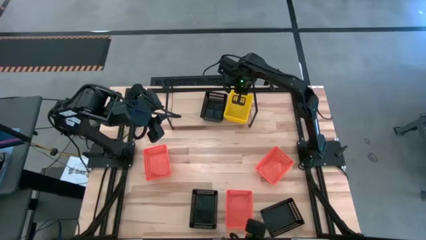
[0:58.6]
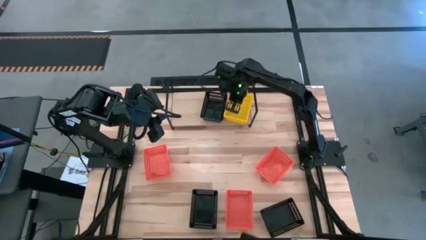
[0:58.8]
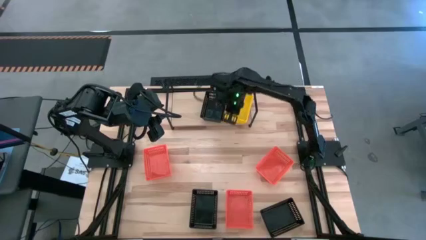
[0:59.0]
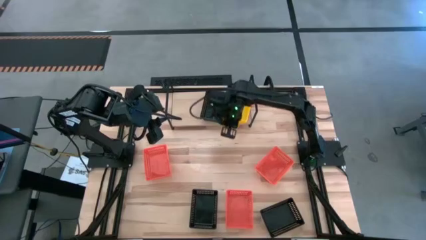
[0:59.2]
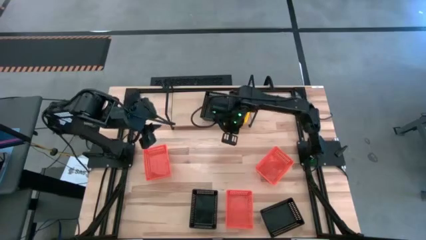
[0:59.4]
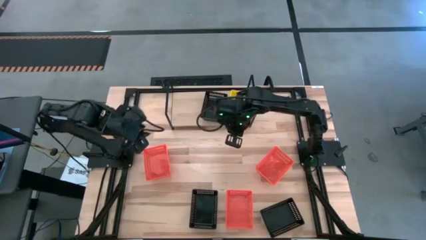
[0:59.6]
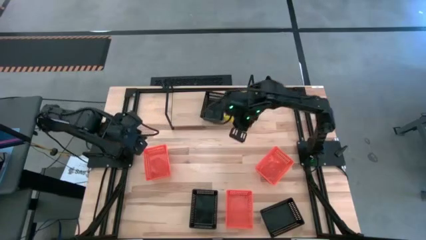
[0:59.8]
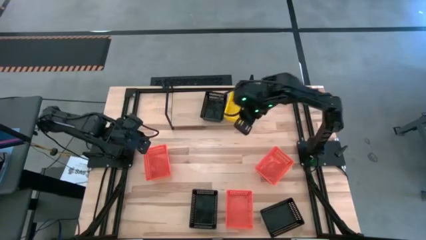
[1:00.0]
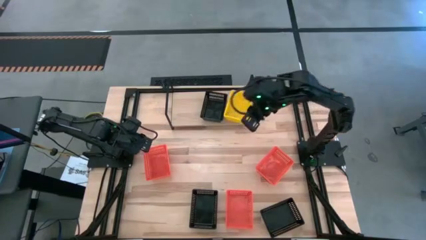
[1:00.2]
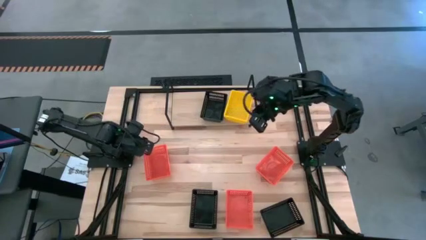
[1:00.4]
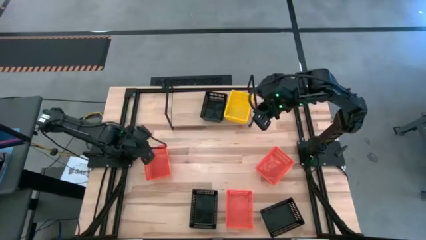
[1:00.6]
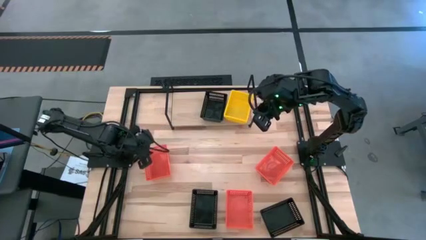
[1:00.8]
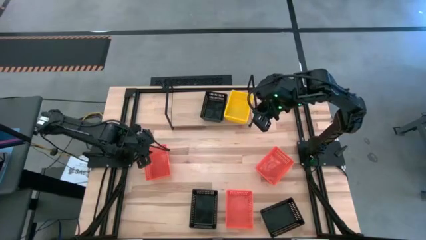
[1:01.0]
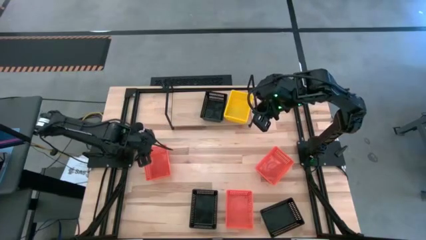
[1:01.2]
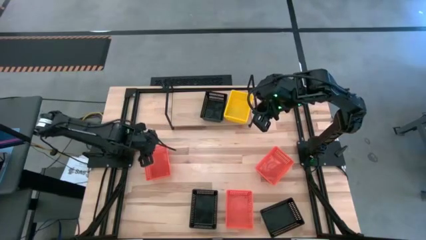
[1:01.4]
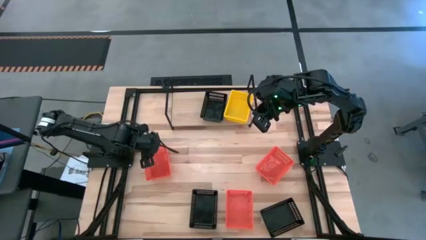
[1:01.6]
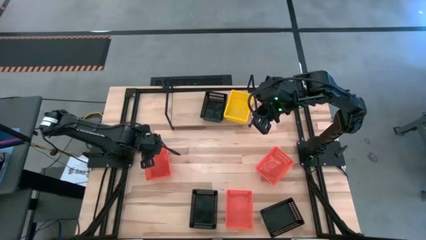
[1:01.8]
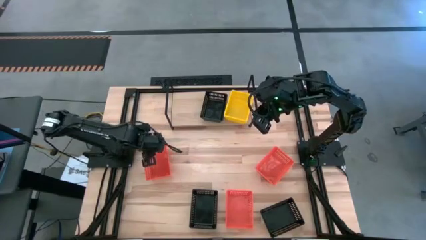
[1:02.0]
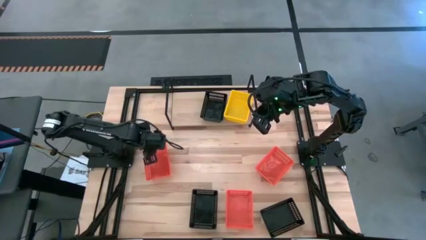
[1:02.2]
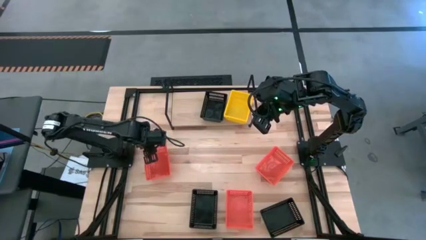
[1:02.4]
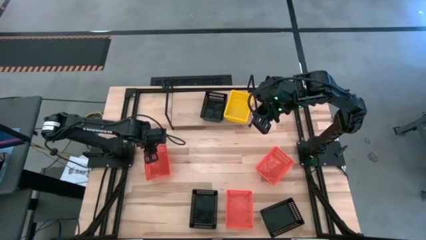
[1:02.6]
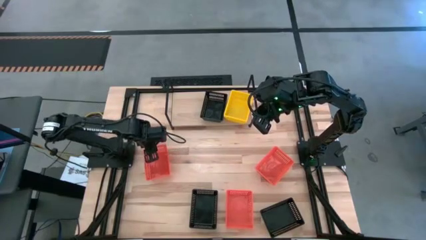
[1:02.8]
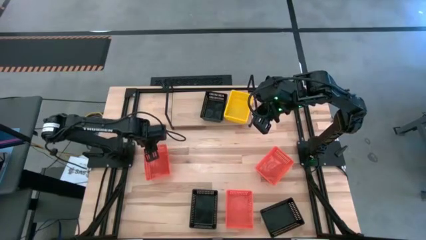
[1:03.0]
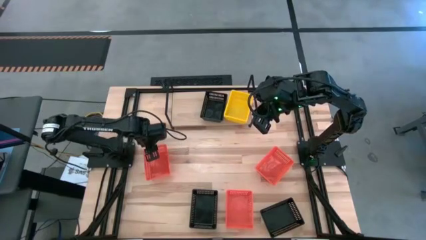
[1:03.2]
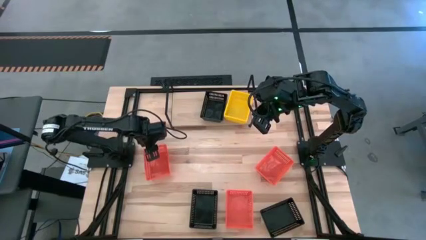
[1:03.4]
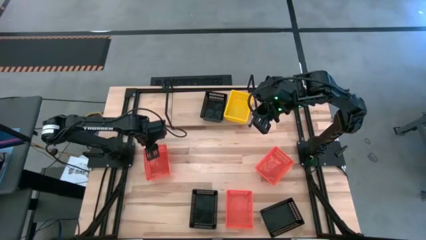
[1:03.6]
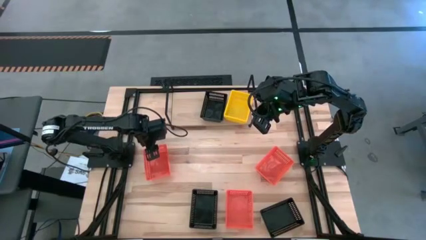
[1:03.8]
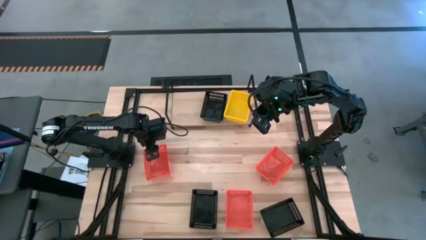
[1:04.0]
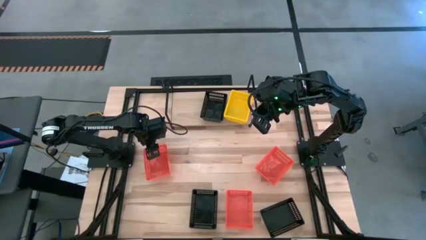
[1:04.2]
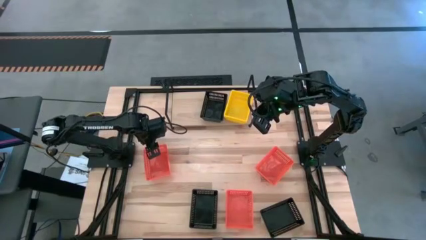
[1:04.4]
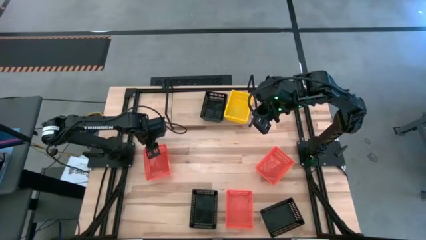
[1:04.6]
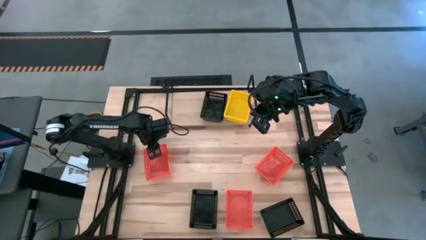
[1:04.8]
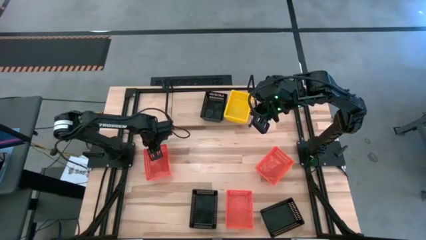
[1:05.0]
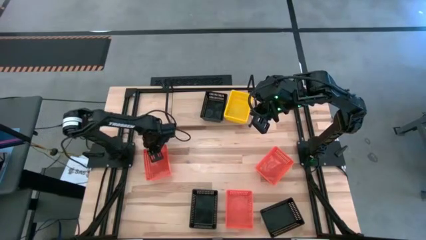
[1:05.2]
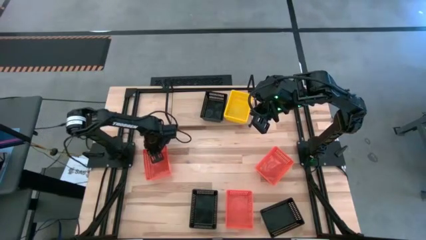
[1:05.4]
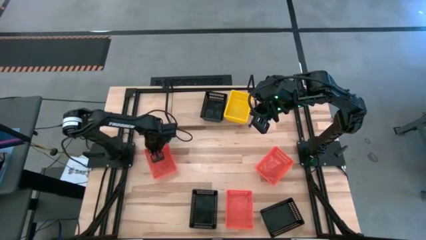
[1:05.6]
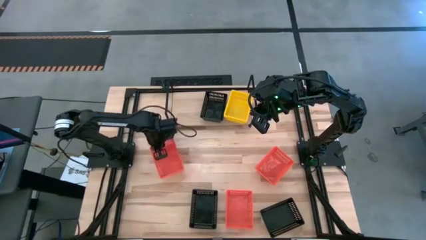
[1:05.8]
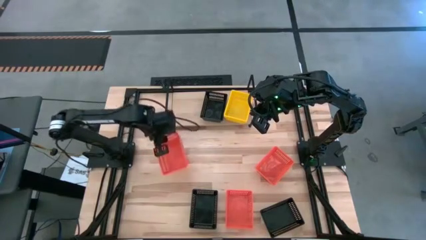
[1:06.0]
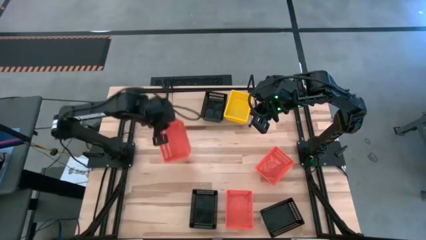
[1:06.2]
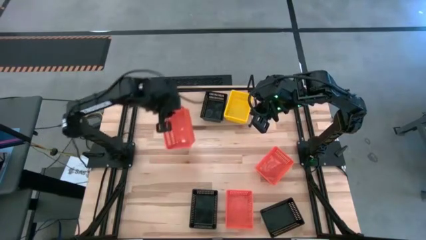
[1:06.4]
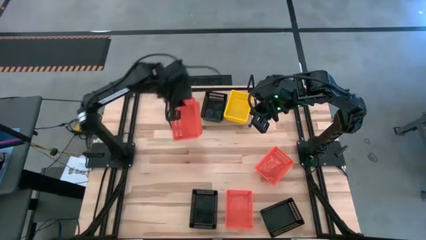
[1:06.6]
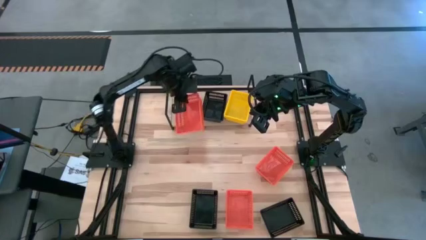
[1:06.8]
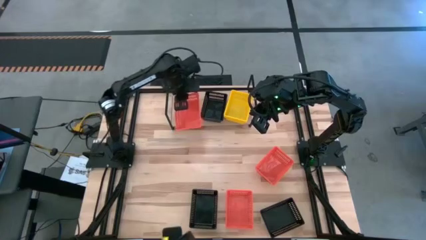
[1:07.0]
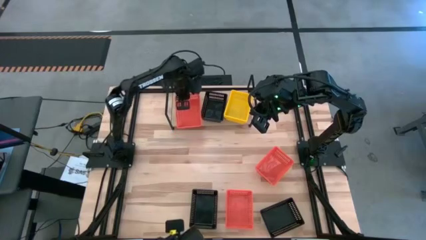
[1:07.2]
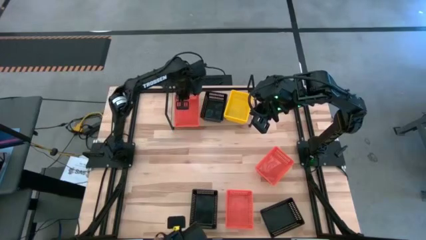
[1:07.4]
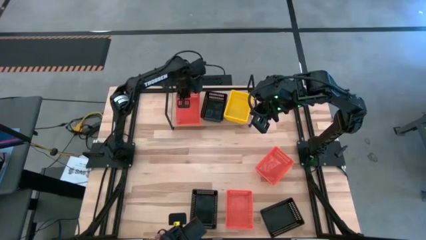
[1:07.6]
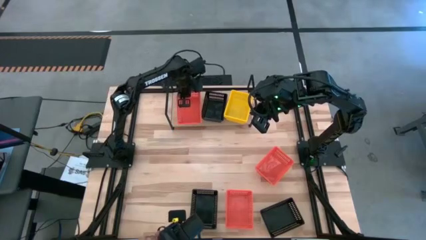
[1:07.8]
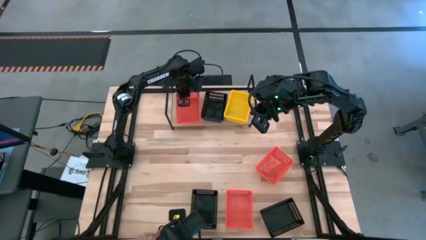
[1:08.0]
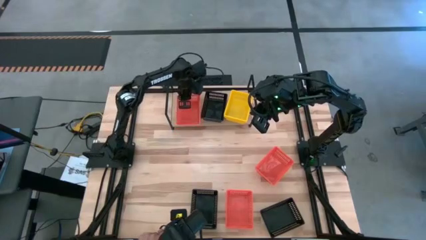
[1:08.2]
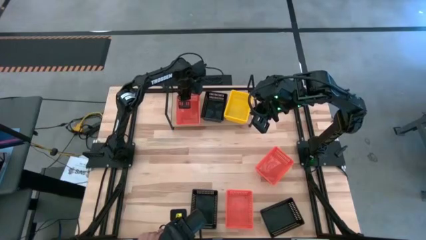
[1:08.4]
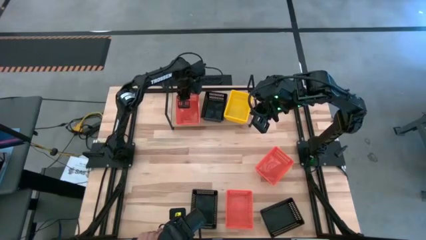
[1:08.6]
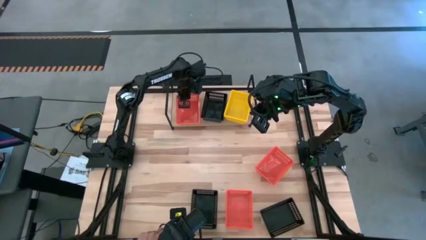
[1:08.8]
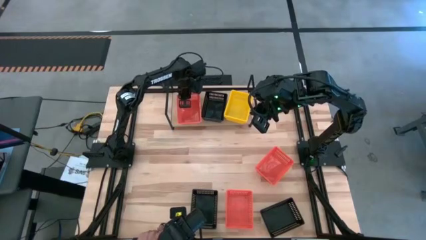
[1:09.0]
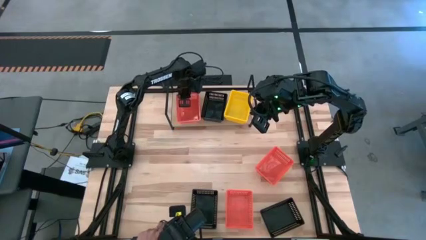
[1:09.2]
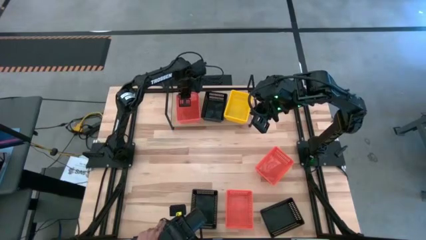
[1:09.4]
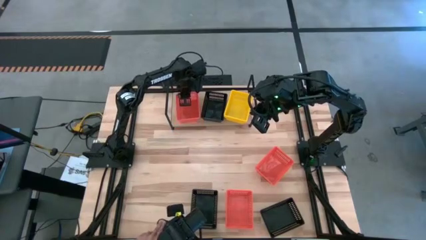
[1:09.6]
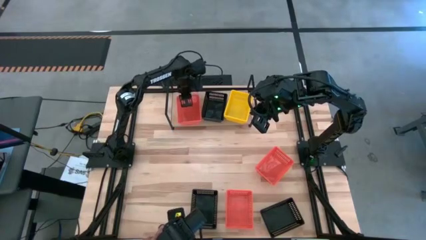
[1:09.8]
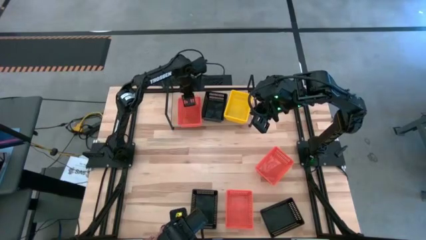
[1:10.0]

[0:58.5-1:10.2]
Task: Stack baskets on shelf by color
Put the left orange basket on the shelf

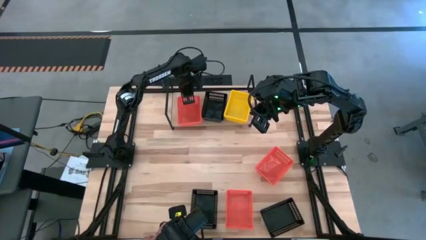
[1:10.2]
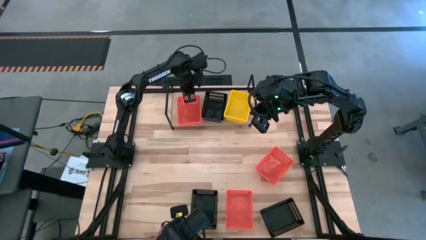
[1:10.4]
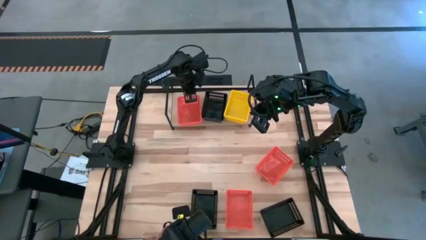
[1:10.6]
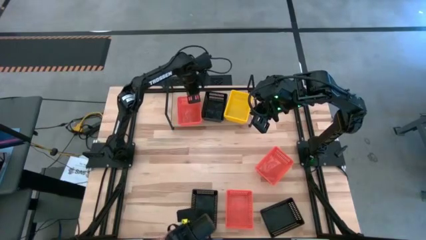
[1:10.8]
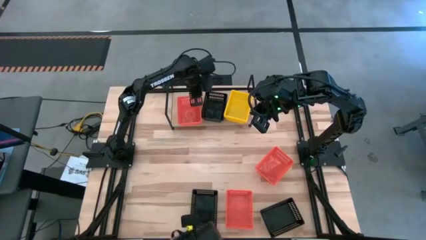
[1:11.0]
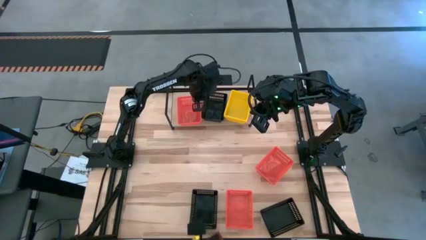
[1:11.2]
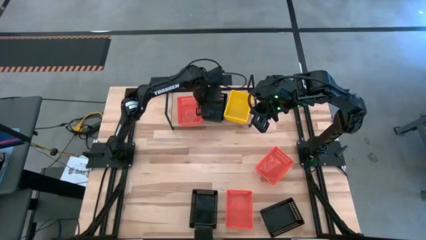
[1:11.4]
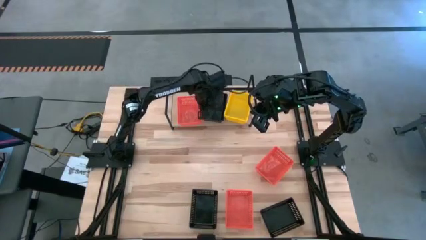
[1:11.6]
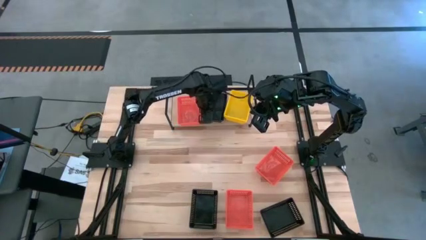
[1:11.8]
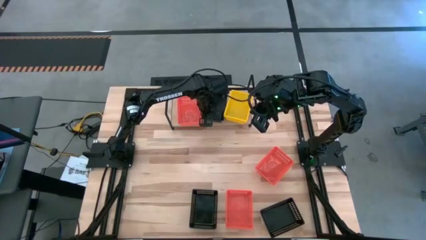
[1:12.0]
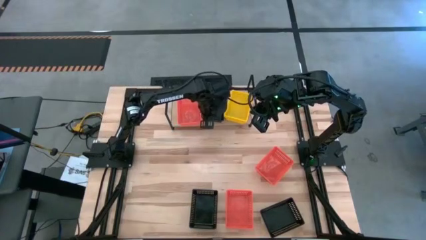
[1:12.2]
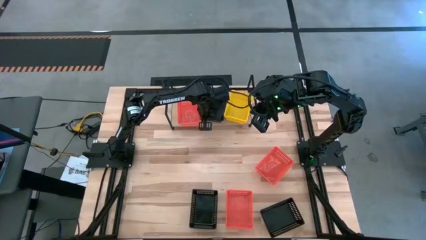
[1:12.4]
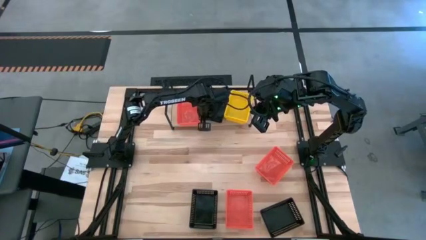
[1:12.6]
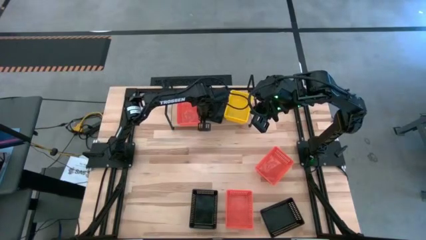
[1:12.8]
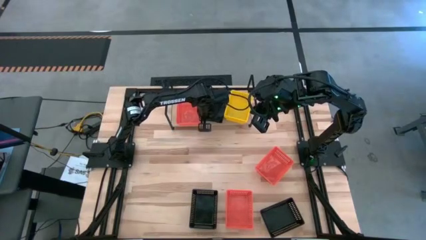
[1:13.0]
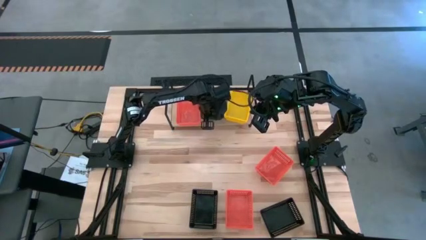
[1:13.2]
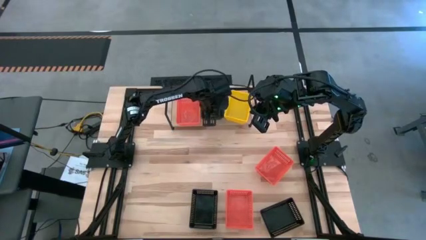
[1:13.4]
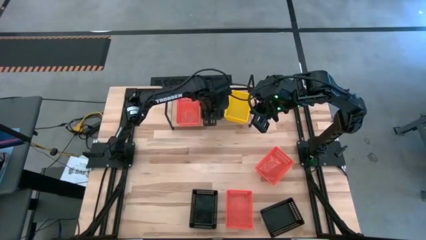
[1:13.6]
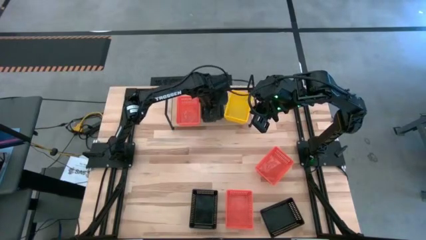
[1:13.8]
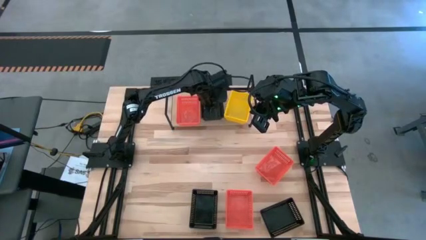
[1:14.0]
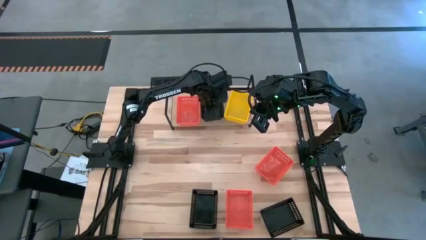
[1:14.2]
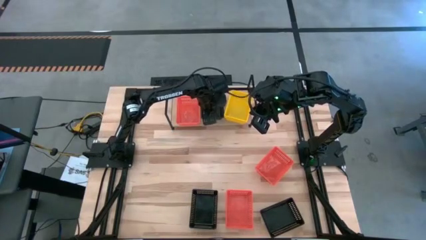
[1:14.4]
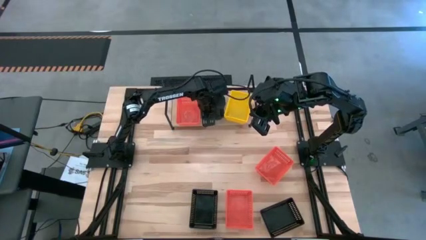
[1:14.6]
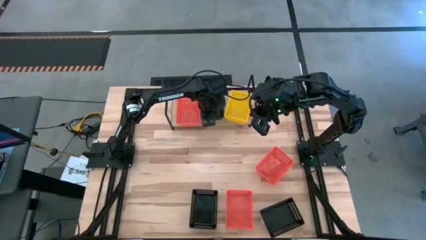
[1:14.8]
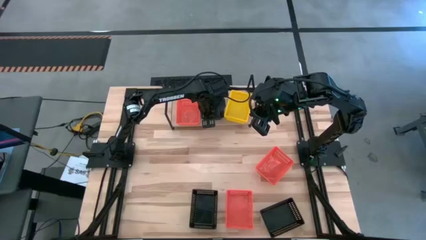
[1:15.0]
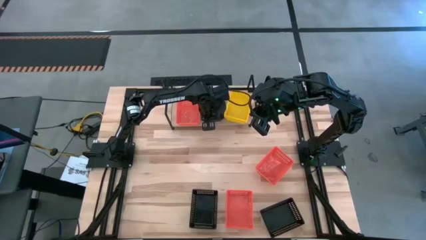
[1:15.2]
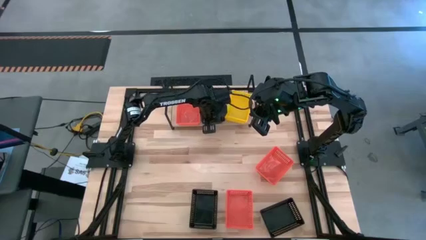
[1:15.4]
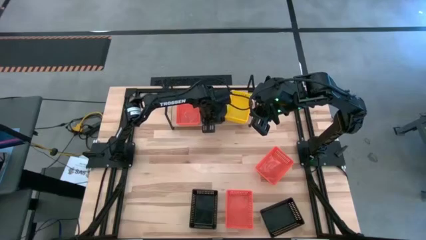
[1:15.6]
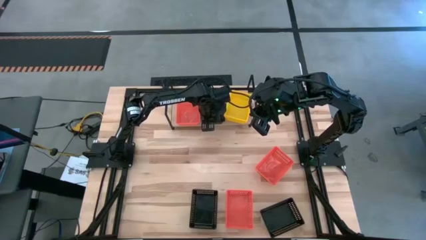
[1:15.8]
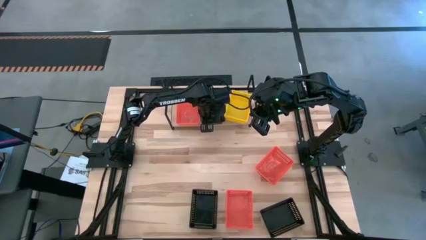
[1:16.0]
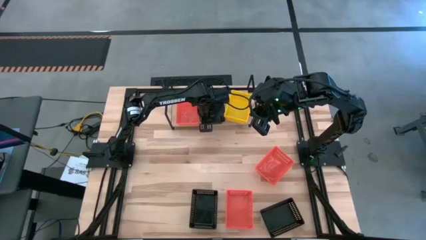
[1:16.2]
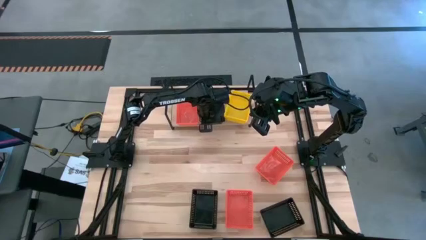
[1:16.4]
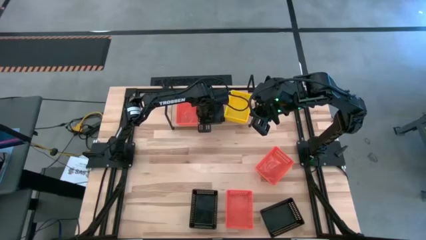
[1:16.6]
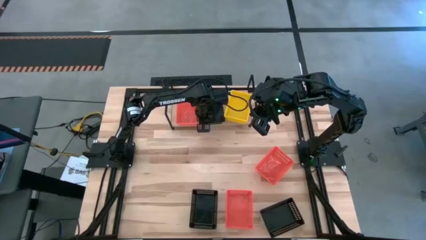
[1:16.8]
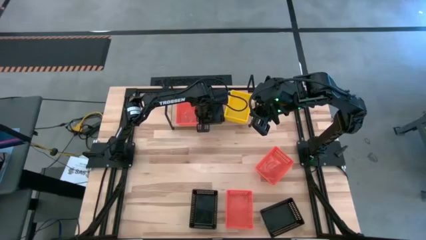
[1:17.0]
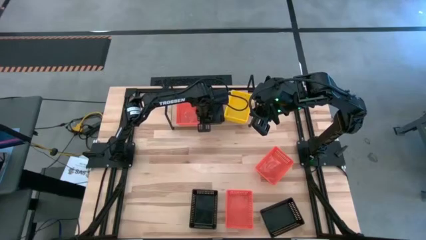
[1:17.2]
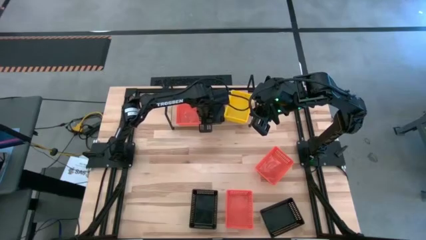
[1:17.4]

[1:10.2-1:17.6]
Adjust the stacked black basket on the shelf
